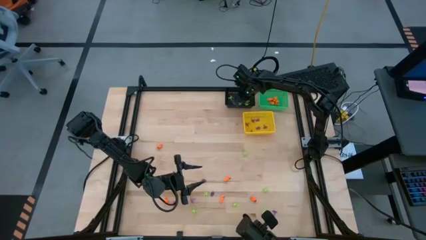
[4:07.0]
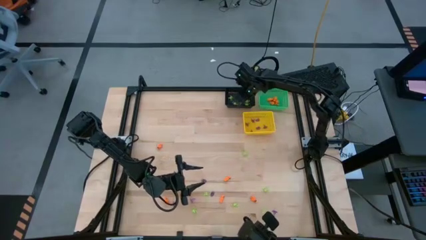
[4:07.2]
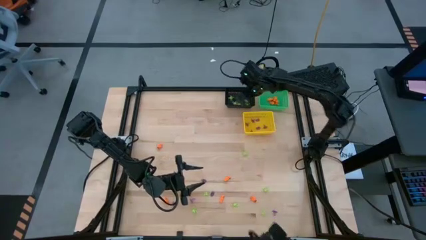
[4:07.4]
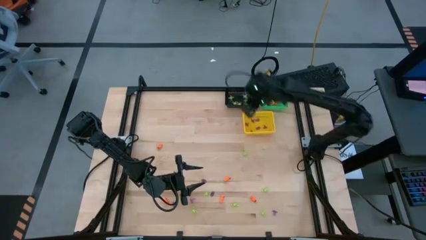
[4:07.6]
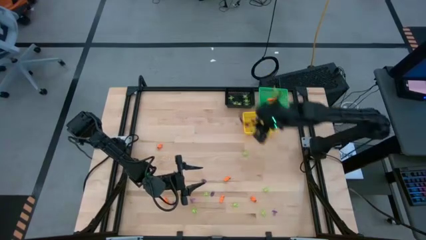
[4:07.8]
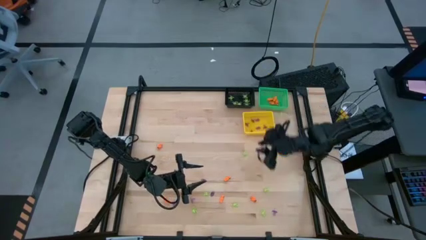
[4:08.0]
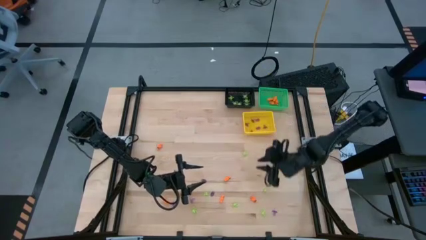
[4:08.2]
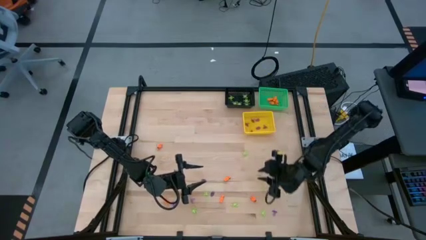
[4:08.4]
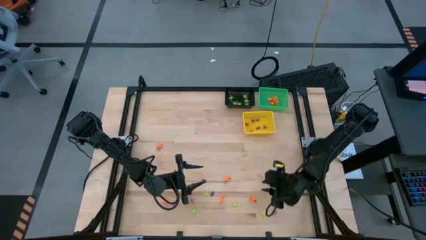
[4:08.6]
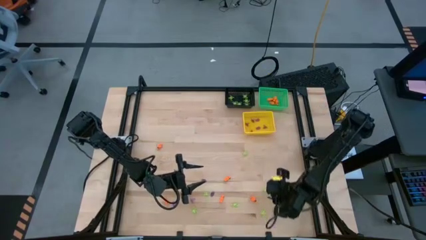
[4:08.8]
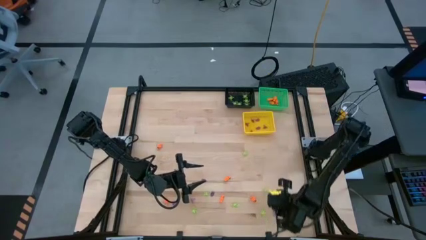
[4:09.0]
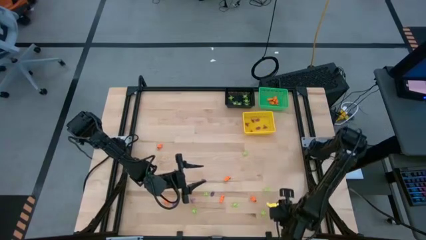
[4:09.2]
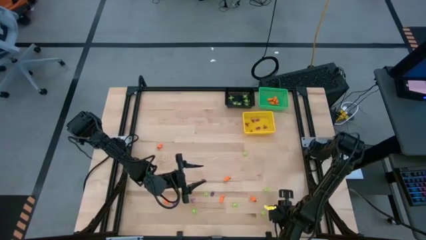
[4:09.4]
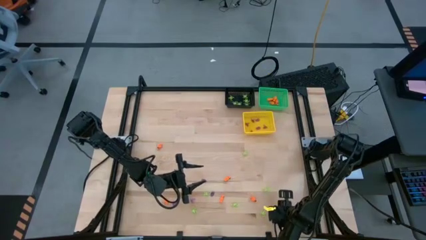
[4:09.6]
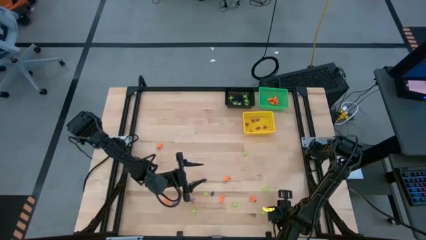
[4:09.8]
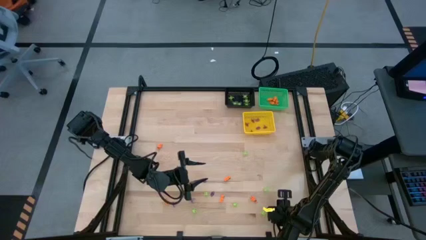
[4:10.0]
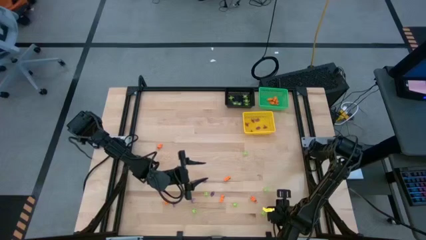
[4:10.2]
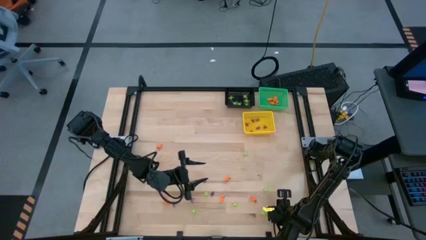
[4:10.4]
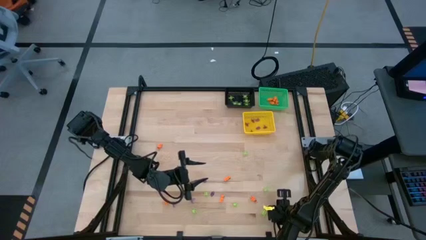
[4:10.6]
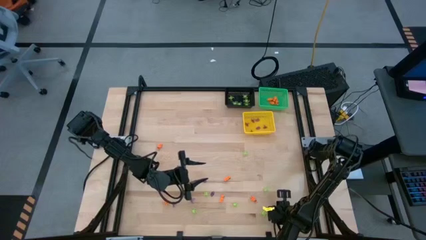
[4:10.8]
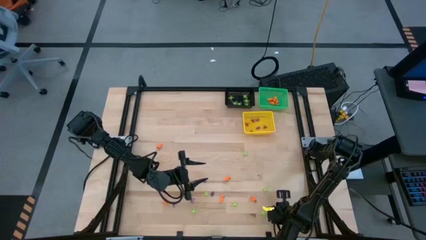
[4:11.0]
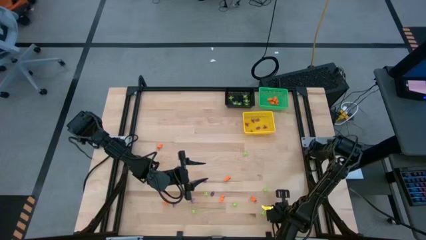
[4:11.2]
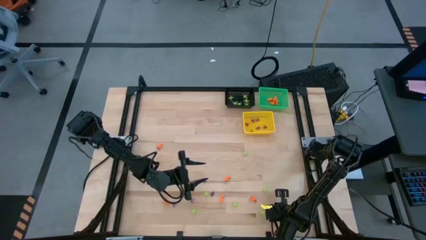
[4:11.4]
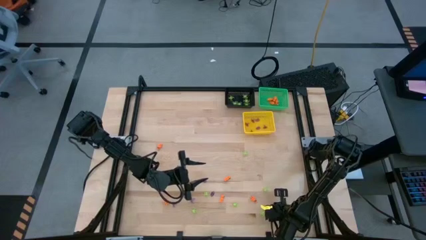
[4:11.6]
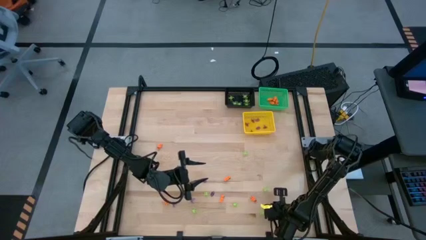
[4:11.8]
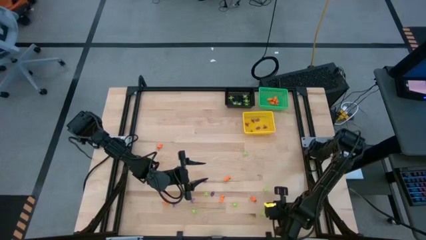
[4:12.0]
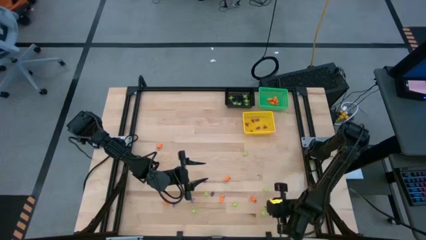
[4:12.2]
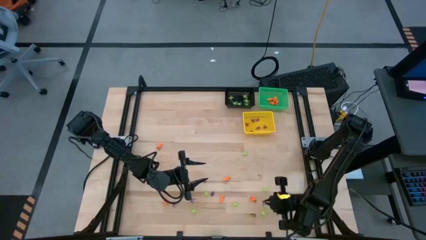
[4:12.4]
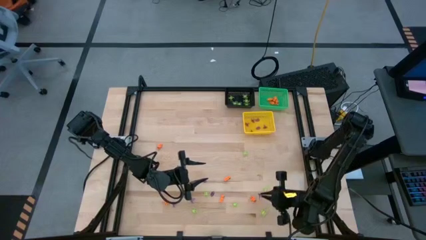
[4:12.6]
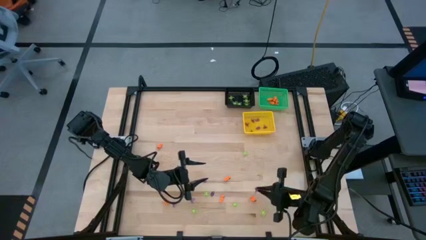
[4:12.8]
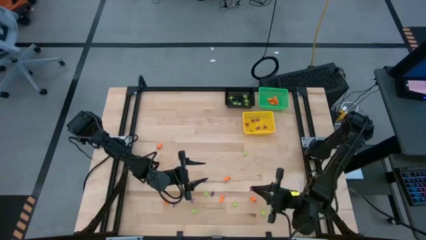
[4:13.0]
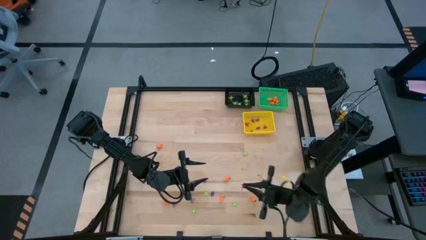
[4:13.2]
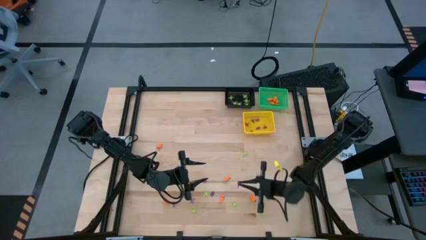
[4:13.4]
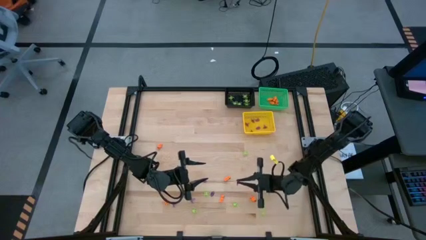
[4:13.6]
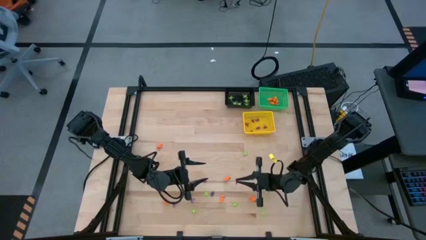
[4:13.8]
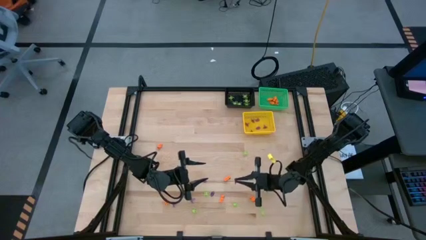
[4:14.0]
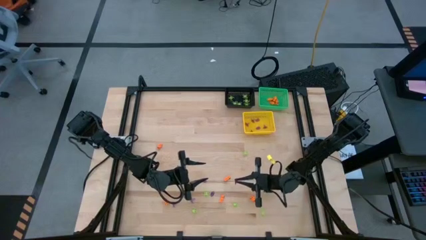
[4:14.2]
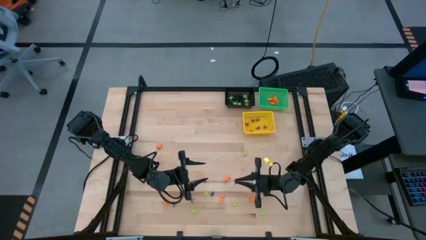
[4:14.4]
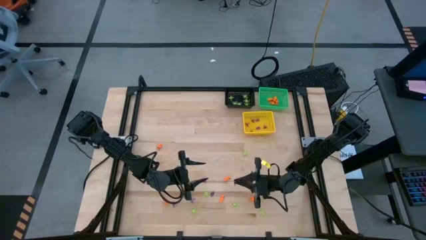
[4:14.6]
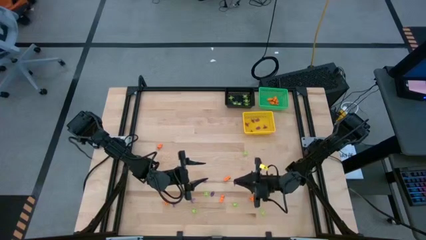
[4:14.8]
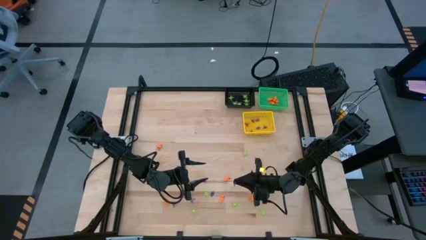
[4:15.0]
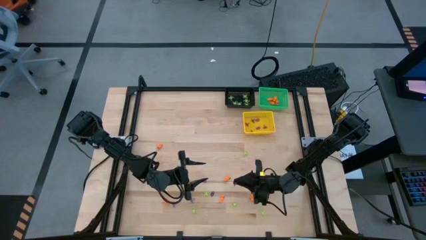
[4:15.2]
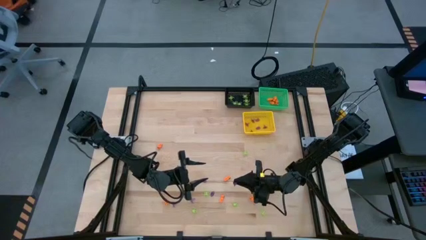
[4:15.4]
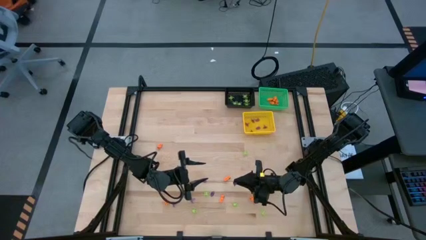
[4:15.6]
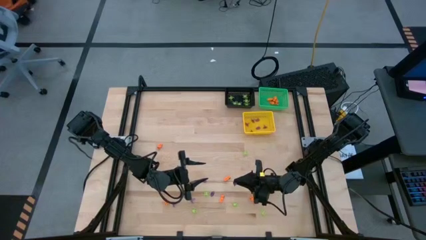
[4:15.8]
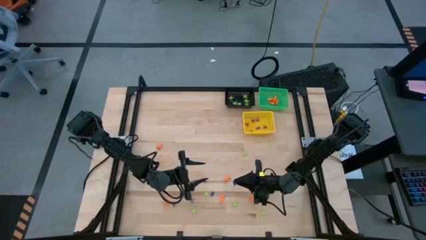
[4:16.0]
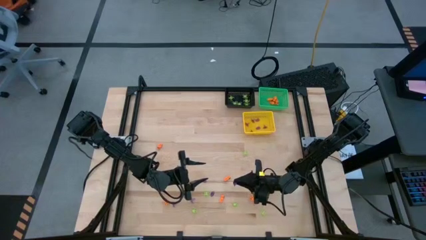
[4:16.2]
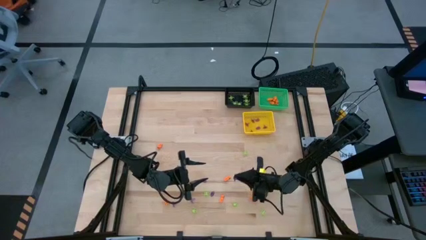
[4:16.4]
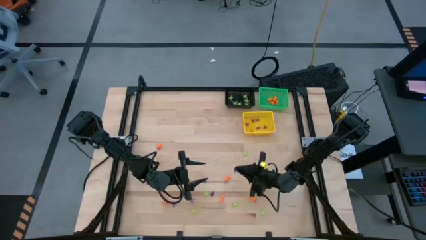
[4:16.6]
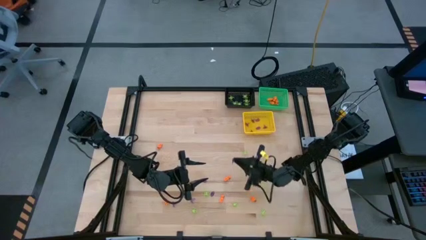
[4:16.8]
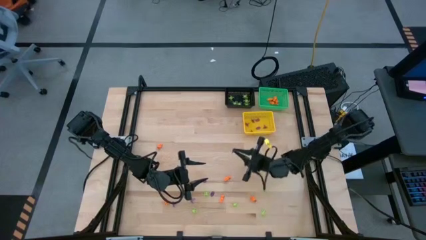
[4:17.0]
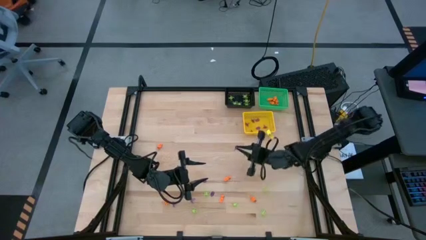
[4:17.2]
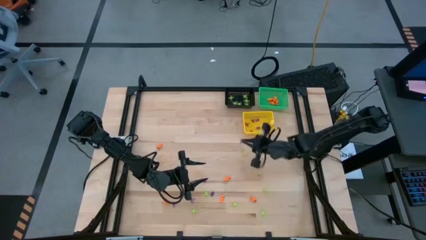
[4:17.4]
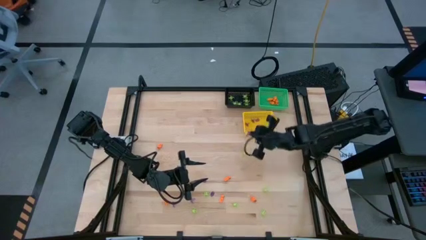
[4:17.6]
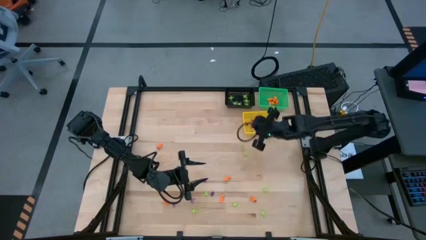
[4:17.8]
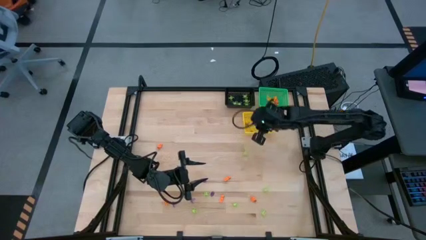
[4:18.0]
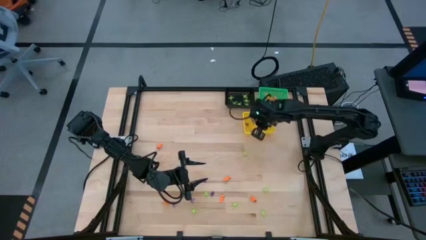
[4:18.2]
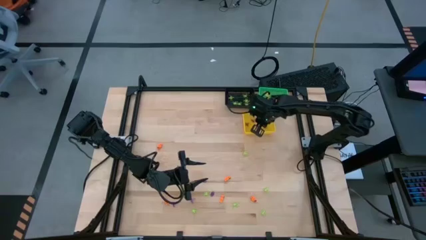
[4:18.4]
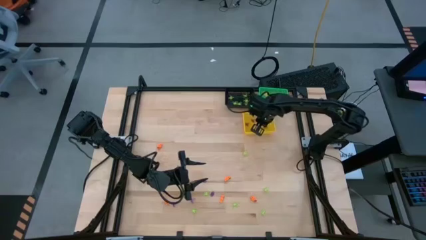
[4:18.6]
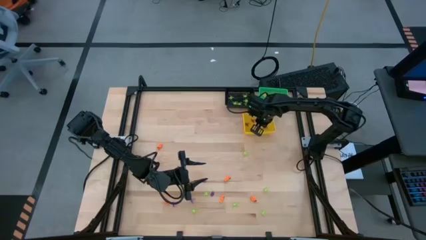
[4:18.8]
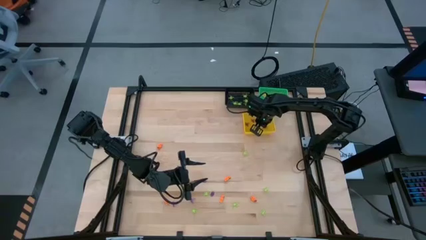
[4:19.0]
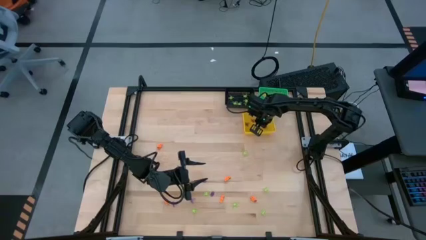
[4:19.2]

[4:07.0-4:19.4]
Task: Sort Halloween decoration
Put the violet witch hat toy into the yellow basket

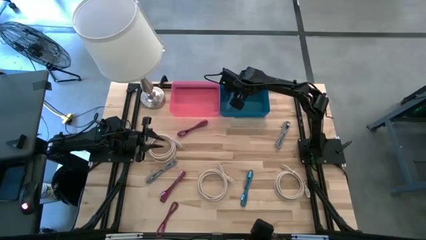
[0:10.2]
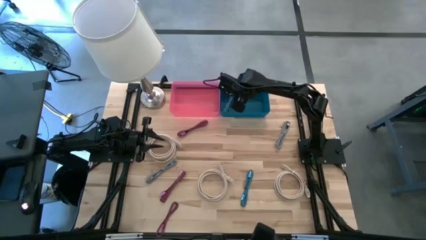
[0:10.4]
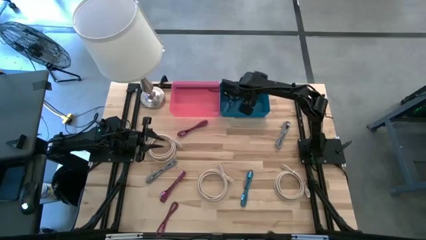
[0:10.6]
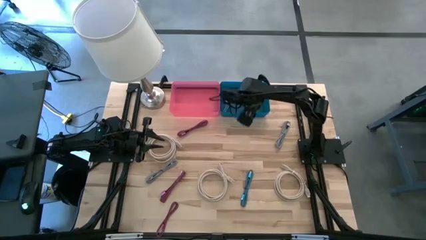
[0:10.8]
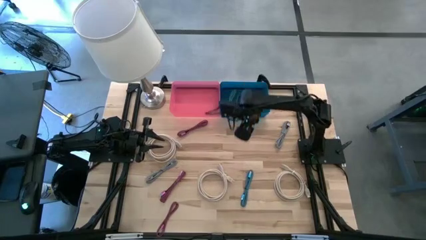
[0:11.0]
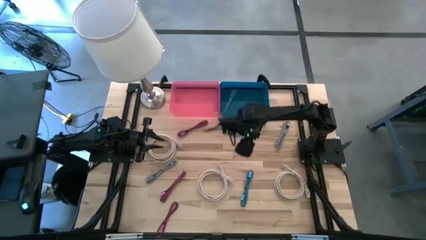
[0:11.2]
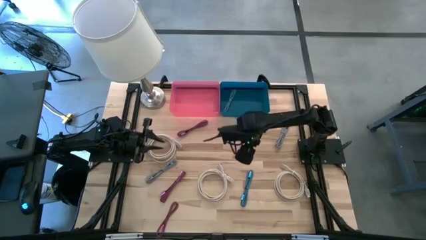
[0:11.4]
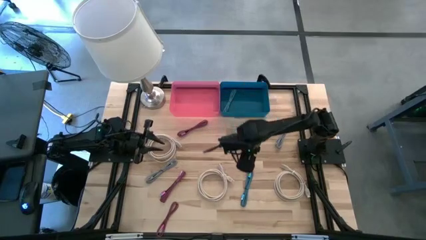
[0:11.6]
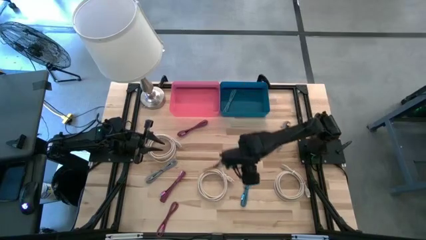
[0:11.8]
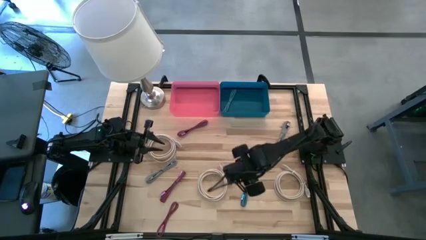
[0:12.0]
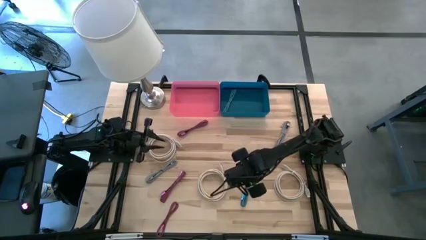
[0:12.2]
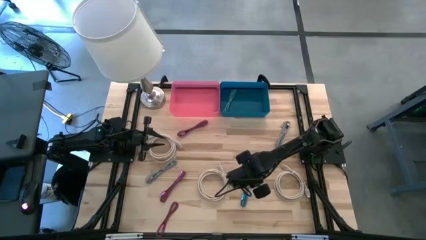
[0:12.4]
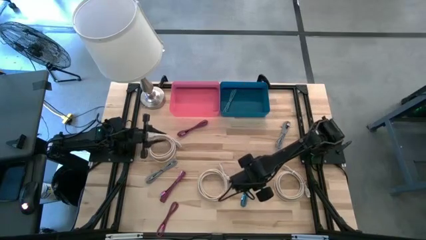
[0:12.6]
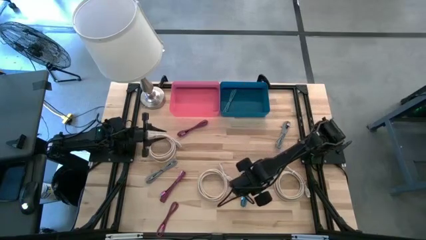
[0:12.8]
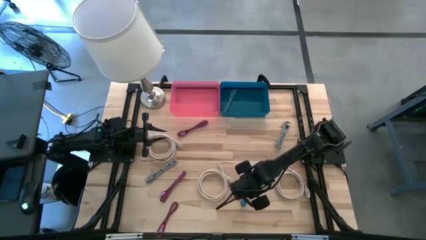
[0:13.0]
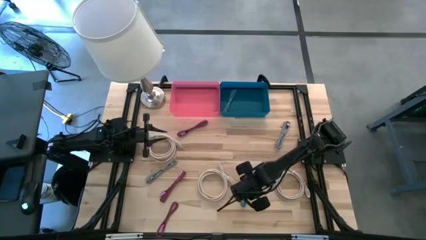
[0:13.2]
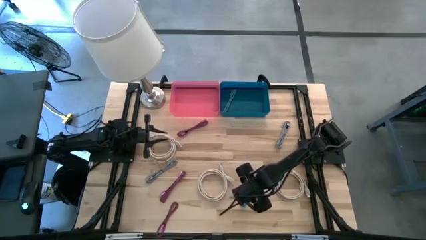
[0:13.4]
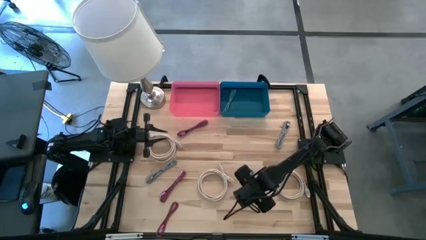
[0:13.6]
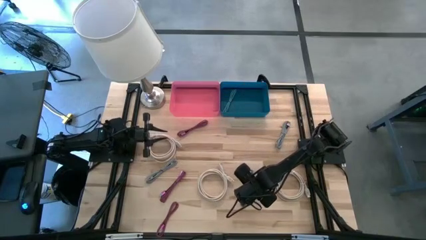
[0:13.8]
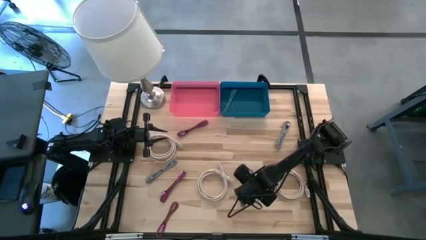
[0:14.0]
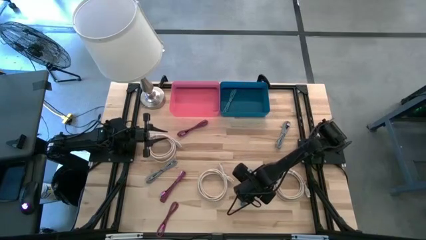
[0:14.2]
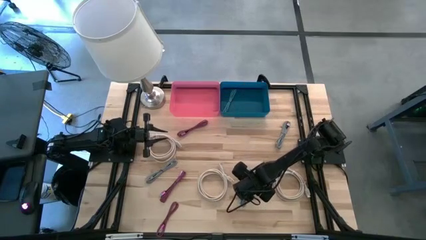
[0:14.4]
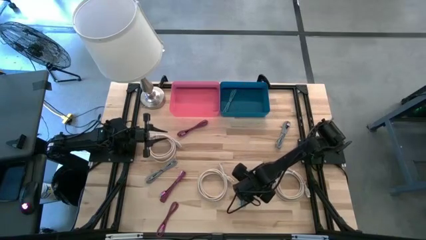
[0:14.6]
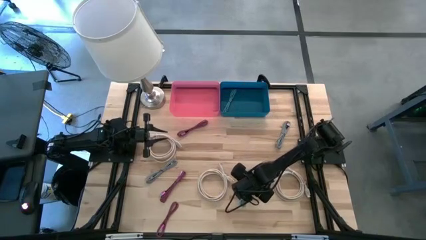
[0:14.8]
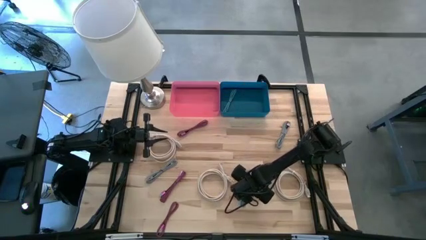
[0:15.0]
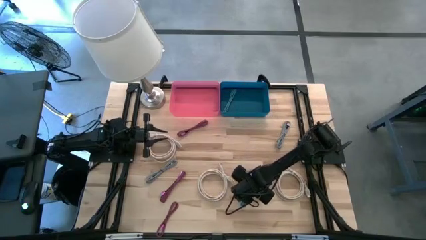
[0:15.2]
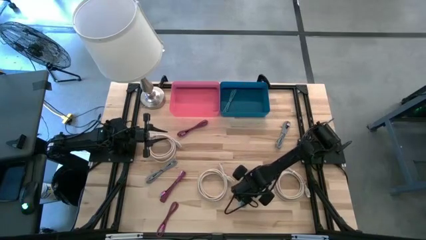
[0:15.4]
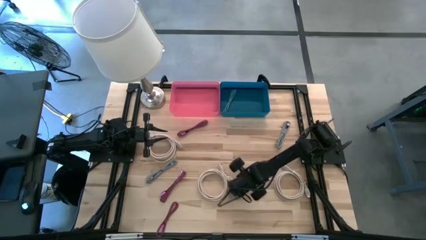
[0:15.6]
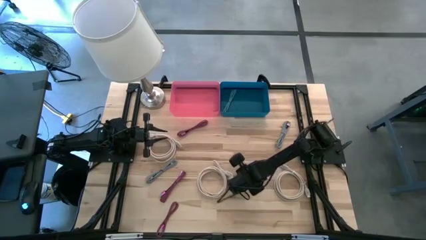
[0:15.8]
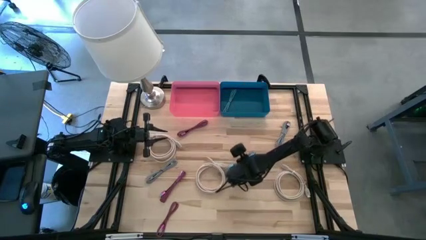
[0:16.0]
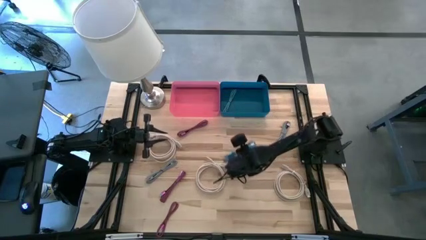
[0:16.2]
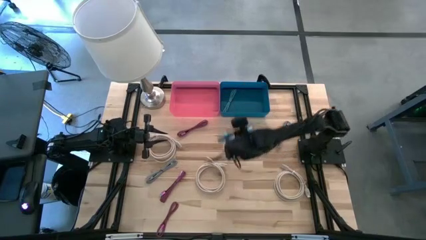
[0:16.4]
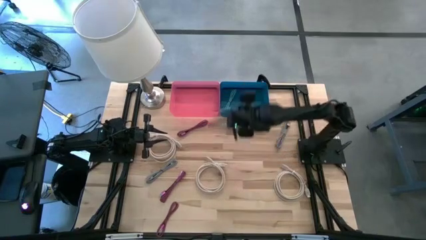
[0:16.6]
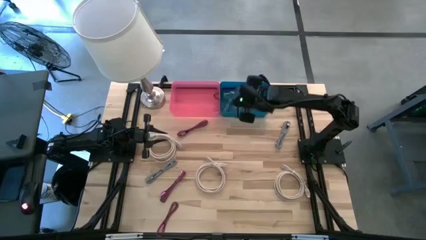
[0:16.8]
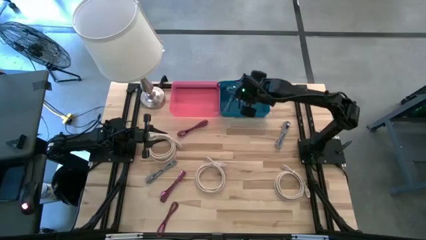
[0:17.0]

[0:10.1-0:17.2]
Task: Pick & Place USB Port
Put the small black and blue charger cable into the blue bin
